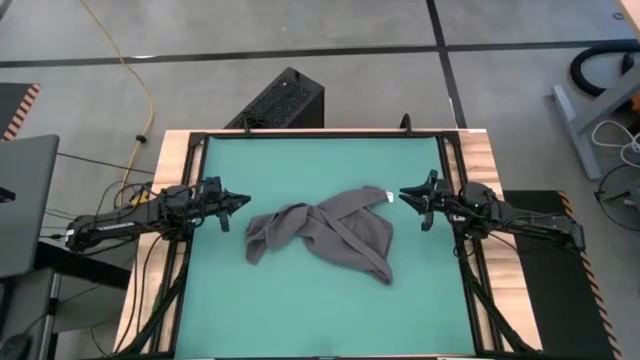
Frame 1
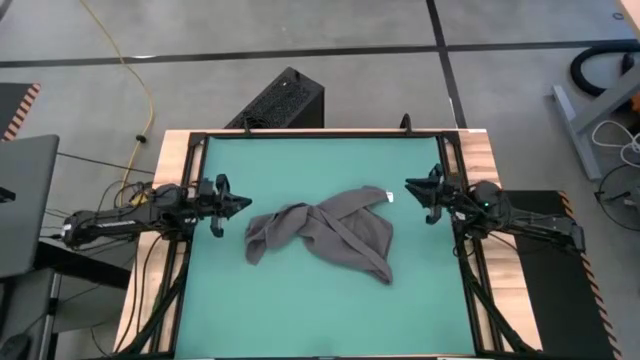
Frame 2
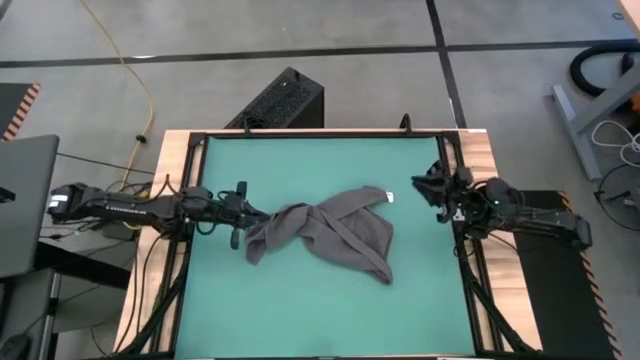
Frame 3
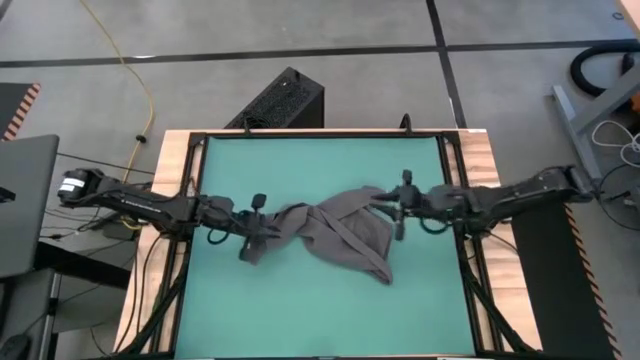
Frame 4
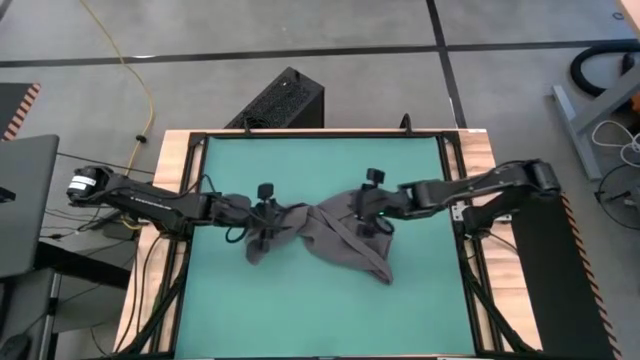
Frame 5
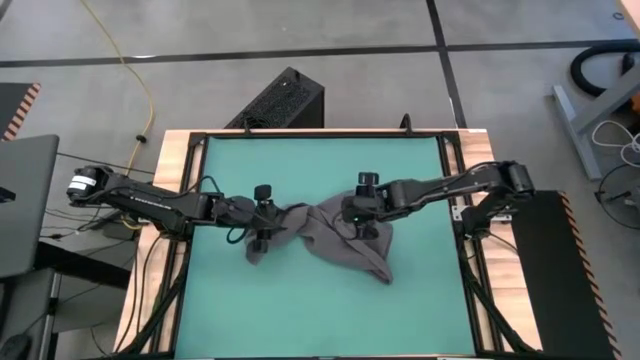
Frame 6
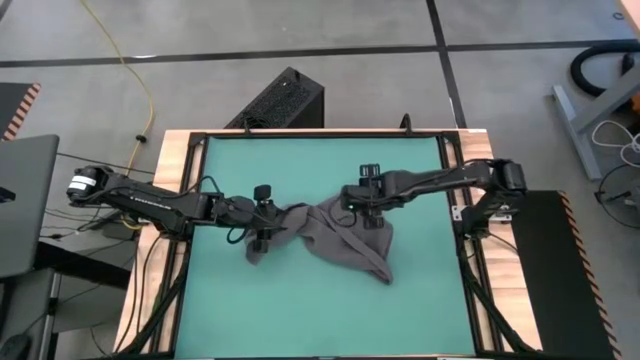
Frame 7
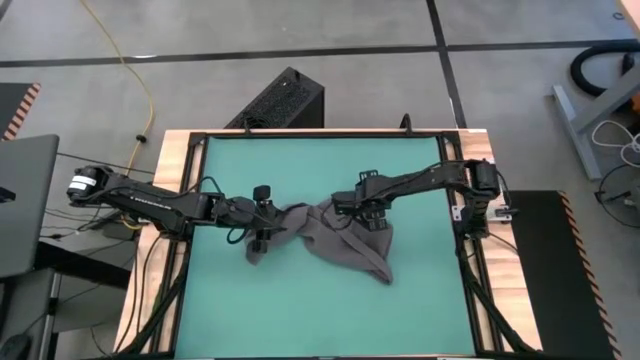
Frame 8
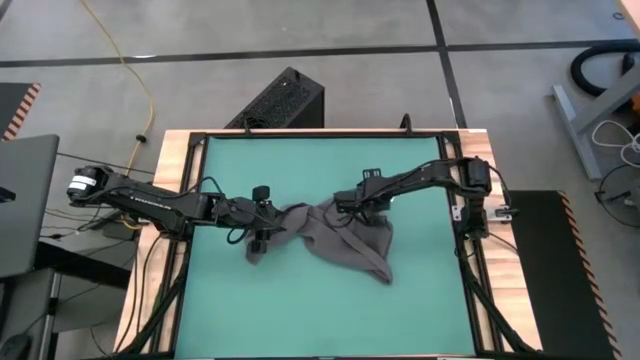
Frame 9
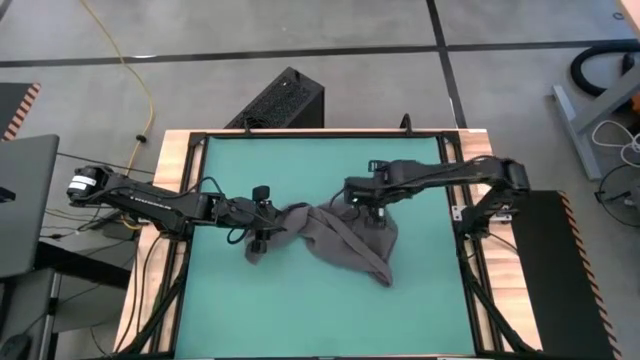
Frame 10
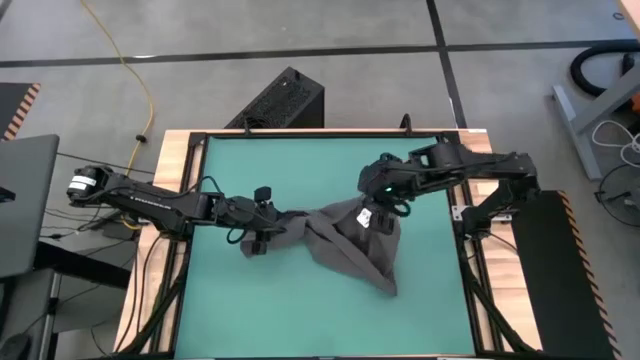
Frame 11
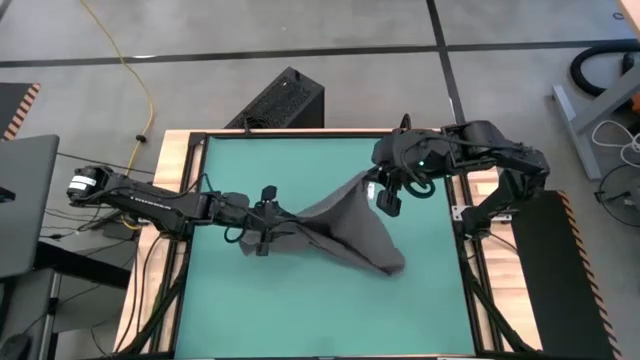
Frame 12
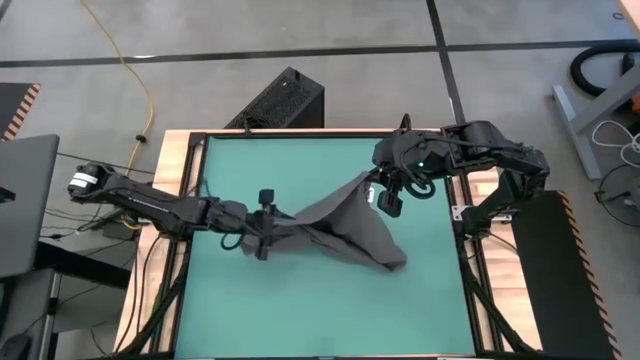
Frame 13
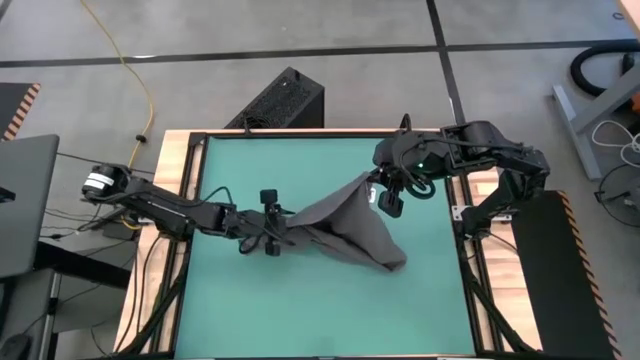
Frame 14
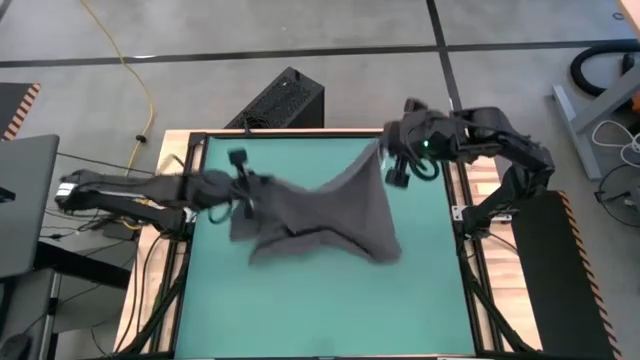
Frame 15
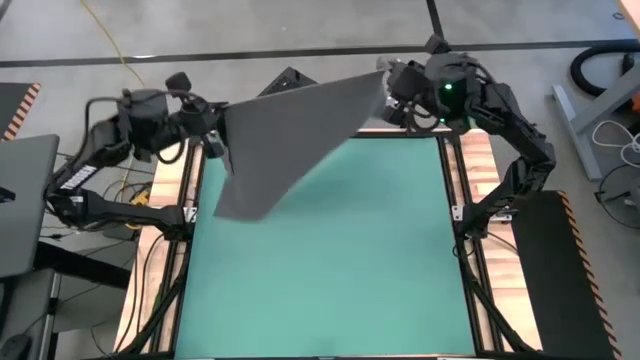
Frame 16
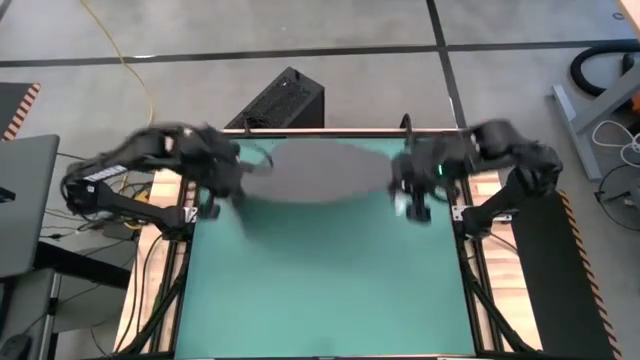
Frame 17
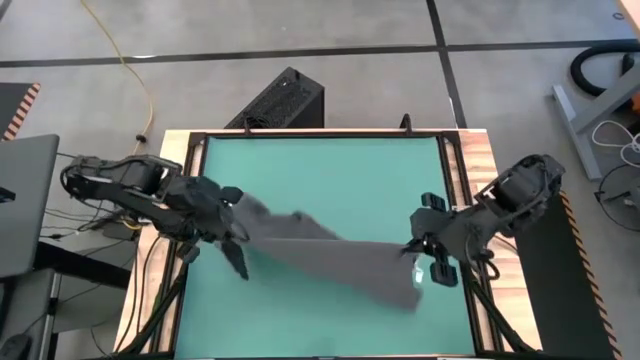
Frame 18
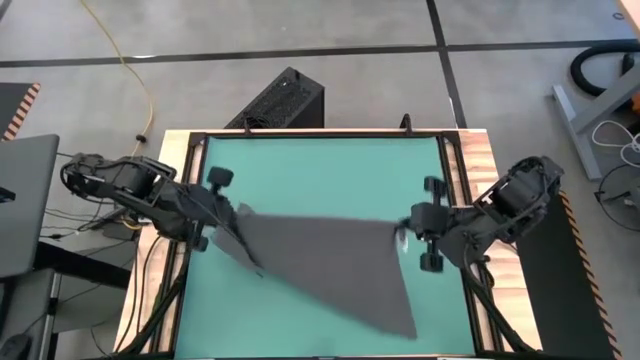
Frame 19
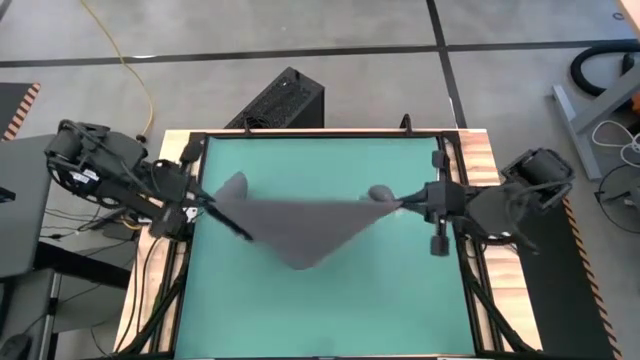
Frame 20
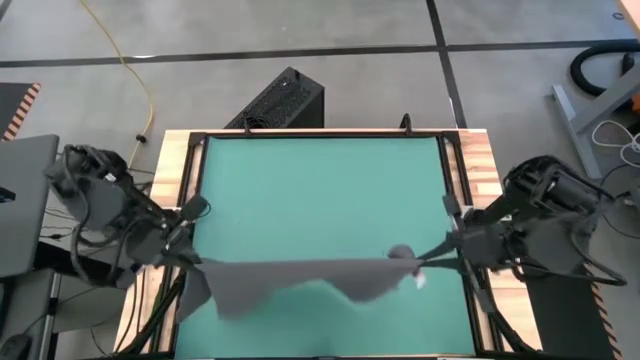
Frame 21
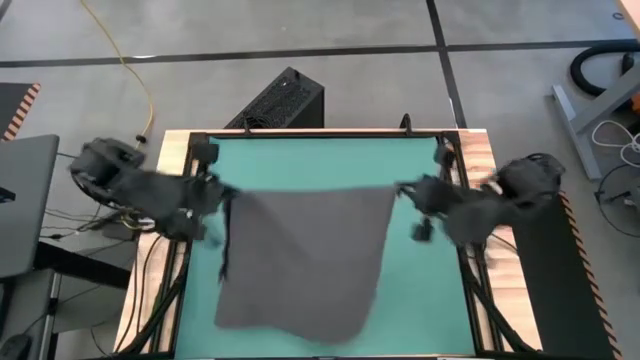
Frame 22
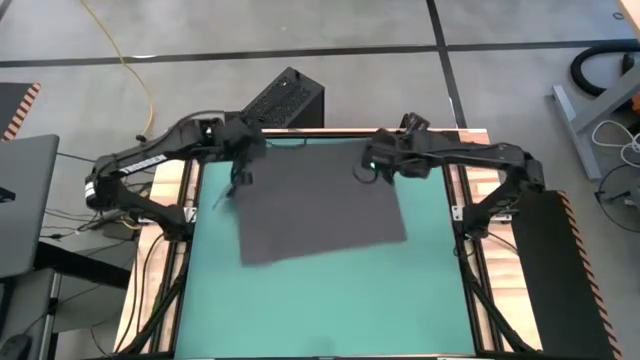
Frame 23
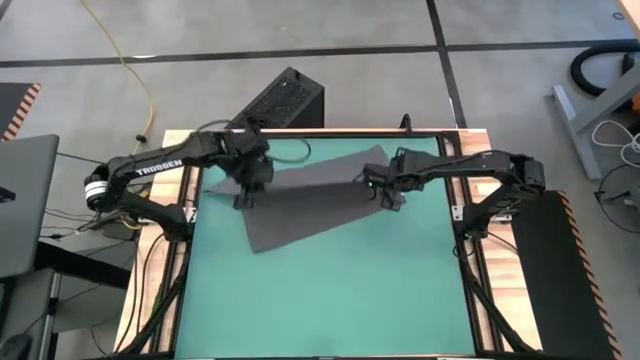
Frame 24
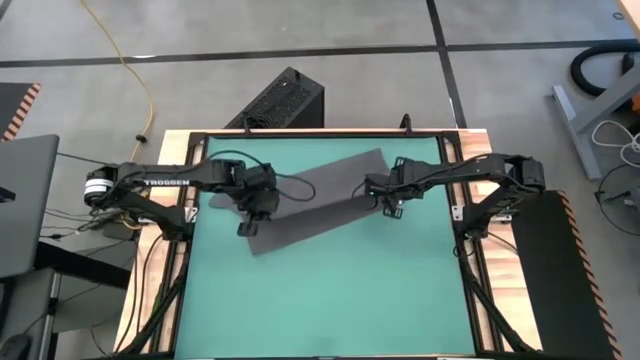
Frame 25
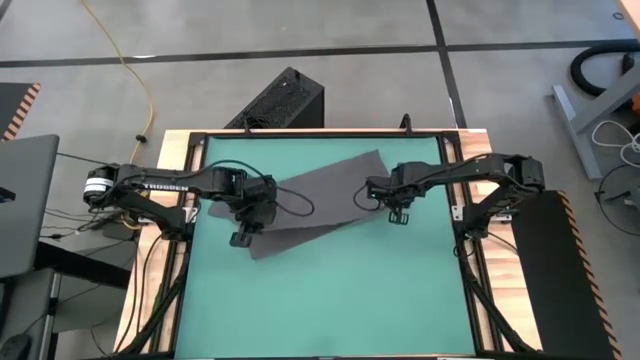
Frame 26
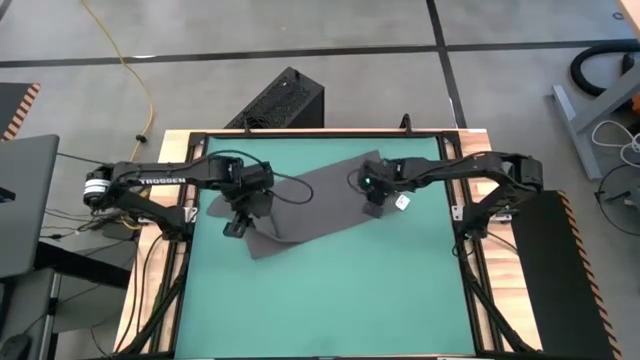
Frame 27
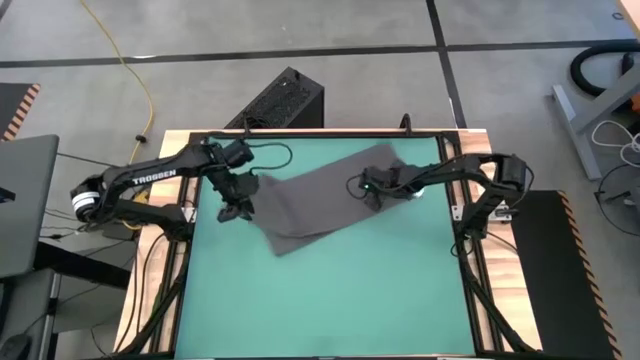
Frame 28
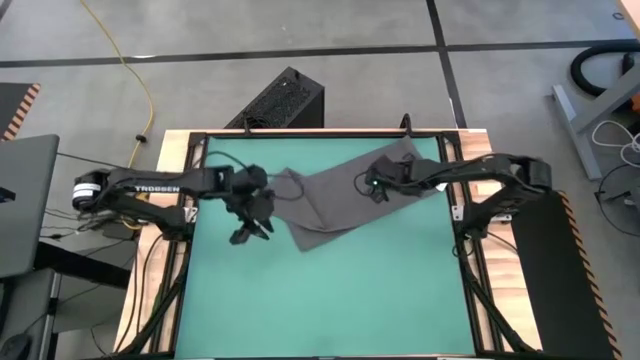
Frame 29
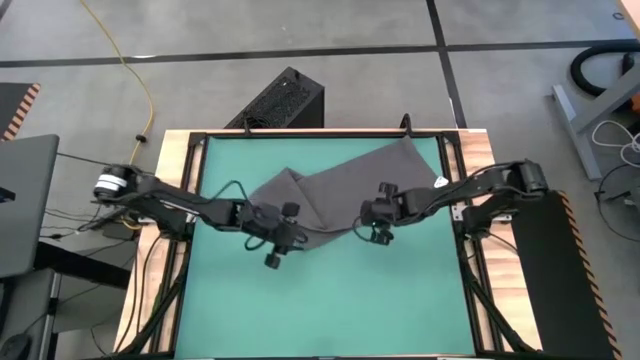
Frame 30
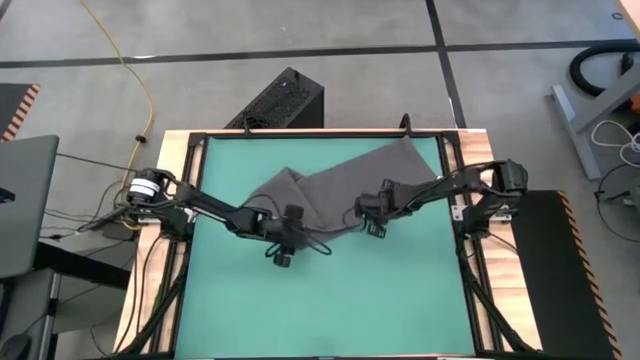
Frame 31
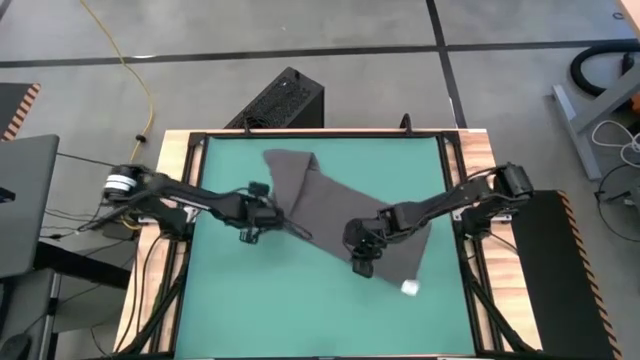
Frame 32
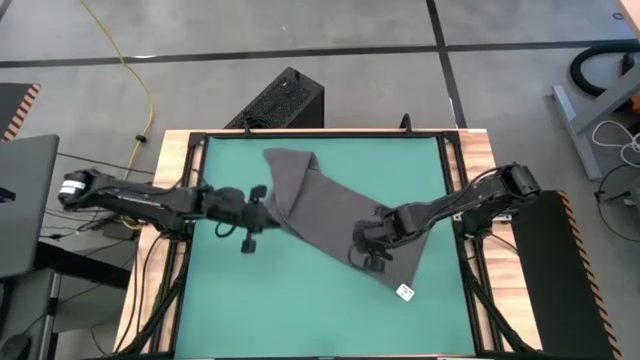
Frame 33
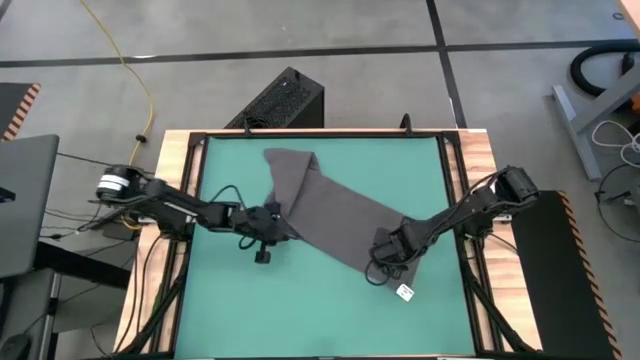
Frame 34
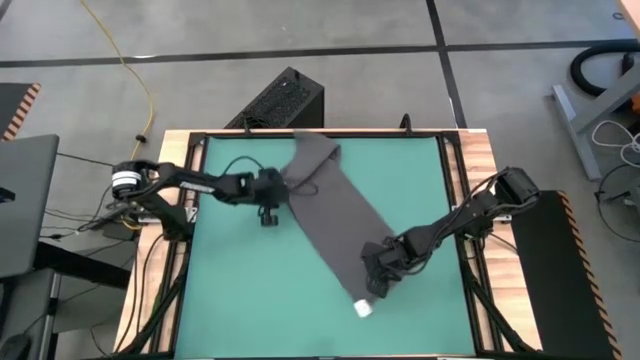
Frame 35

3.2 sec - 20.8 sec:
Task: Roll towel
Fold the gray towel

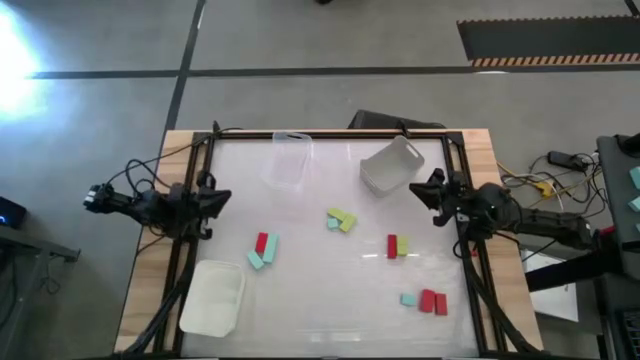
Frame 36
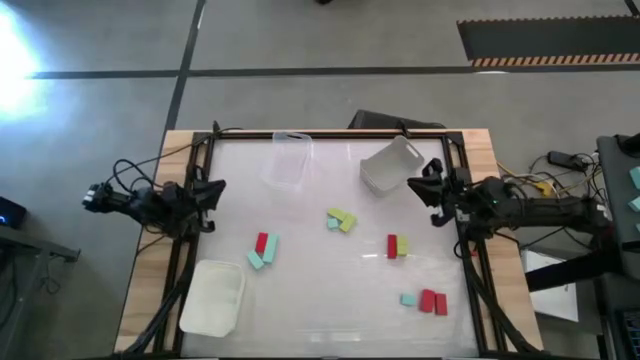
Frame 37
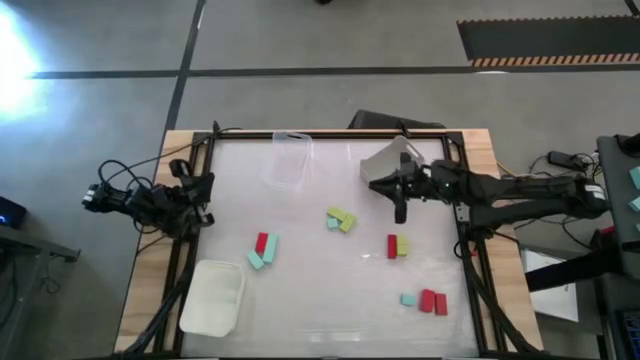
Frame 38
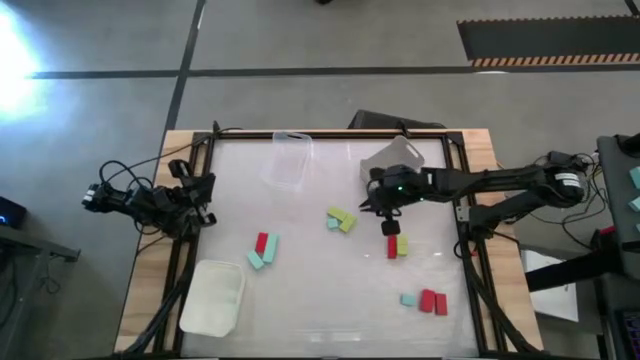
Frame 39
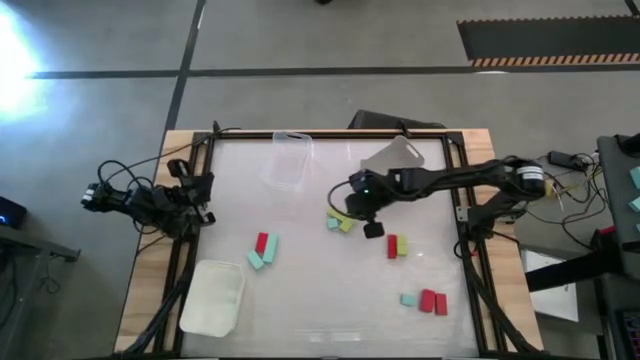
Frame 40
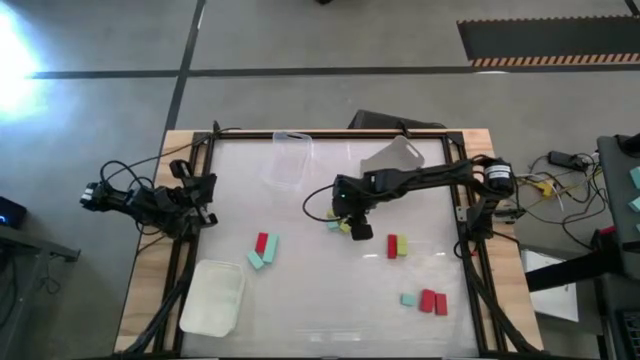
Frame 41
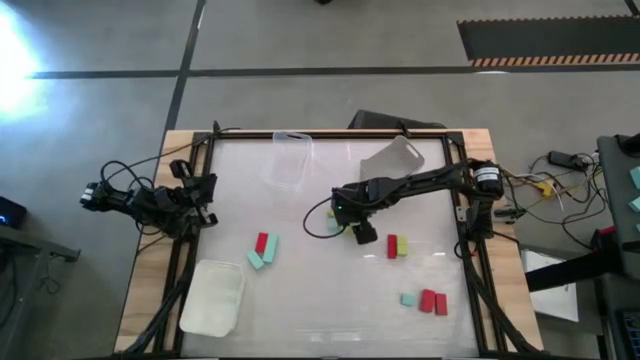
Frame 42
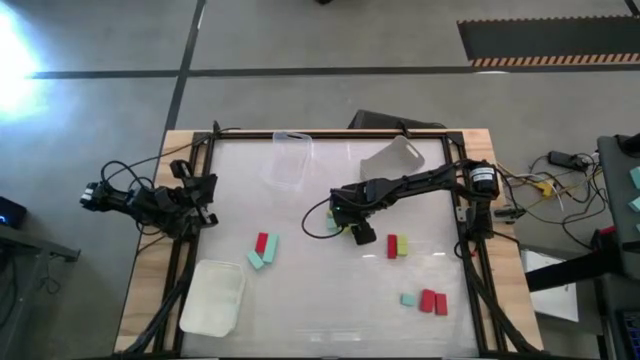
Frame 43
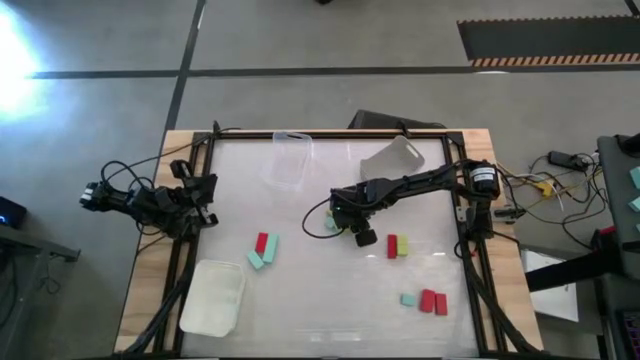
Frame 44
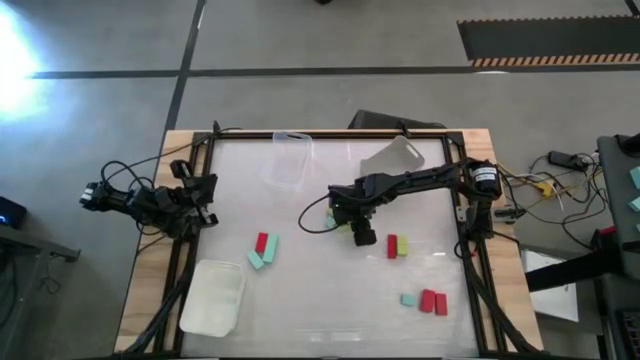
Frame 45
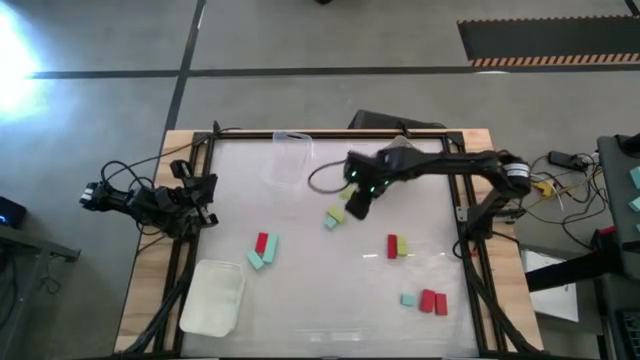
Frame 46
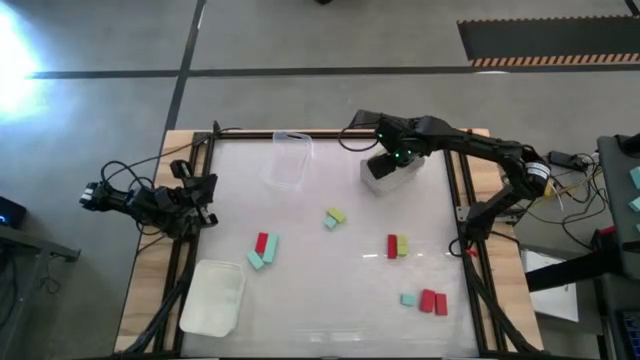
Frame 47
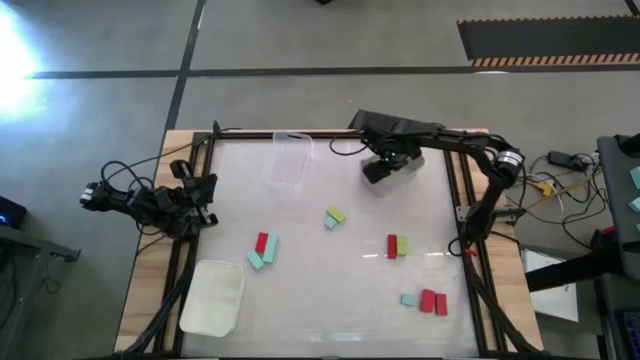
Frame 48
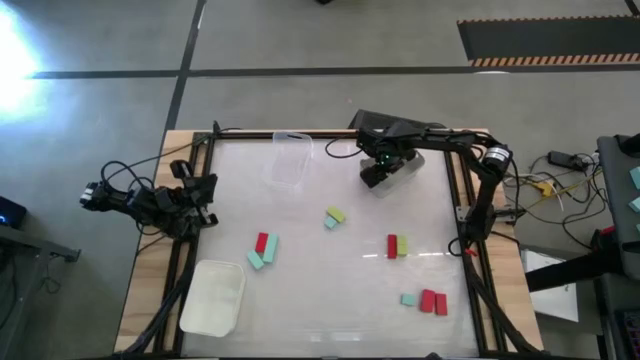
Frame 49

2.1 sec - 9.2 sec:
Task: Sort & place blocks by color
Put the green block into the gray bin
